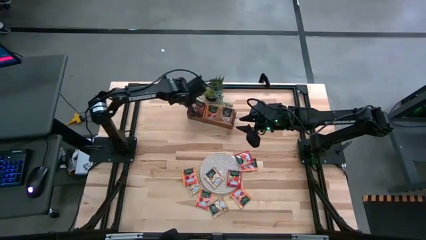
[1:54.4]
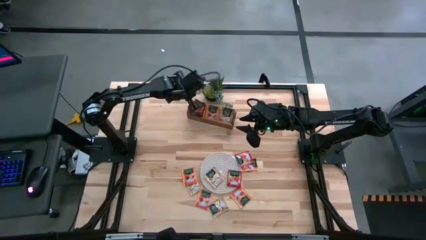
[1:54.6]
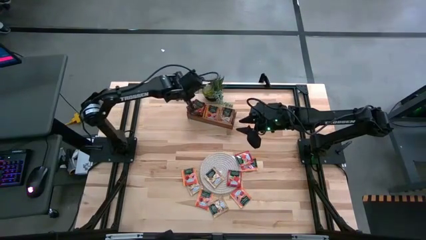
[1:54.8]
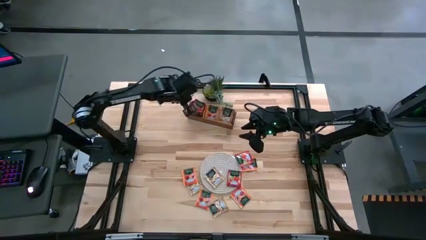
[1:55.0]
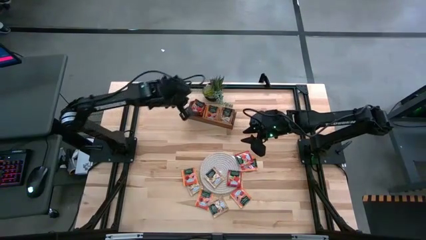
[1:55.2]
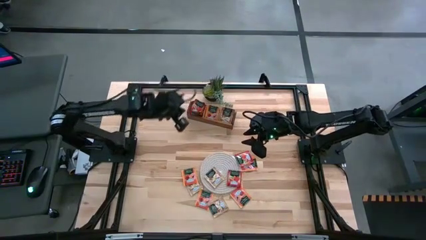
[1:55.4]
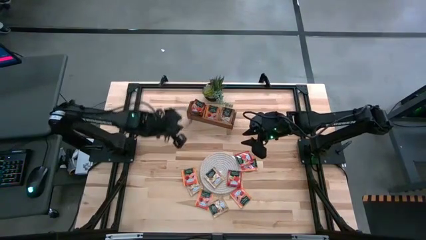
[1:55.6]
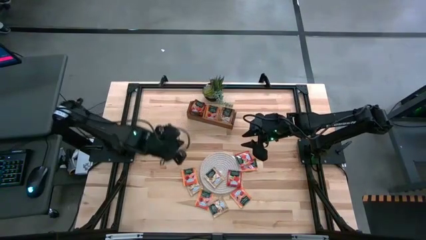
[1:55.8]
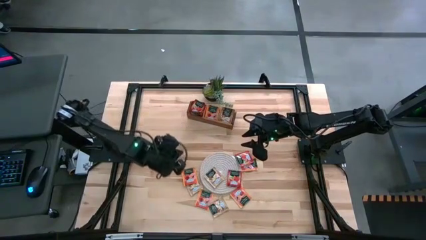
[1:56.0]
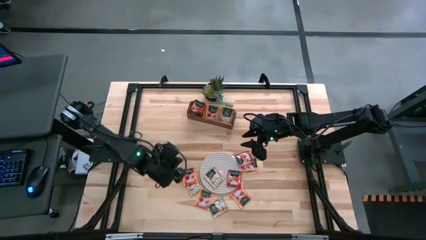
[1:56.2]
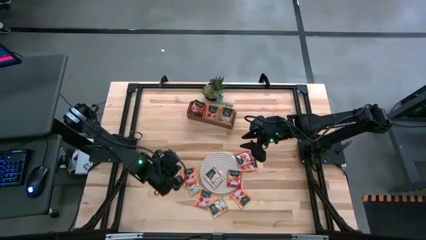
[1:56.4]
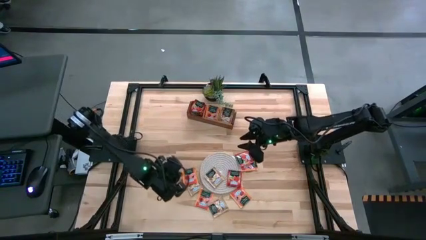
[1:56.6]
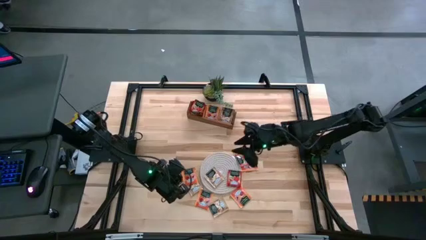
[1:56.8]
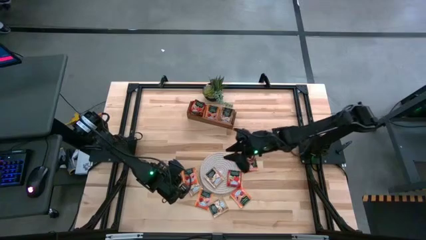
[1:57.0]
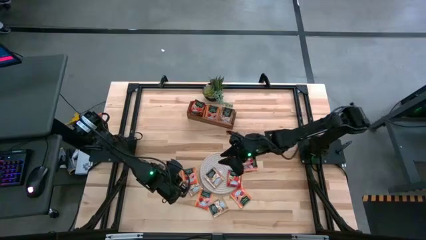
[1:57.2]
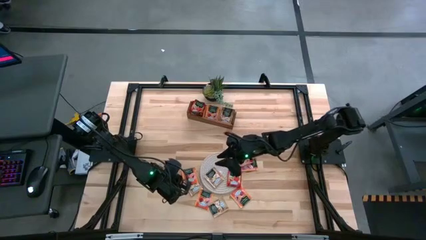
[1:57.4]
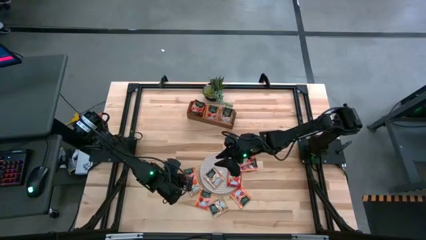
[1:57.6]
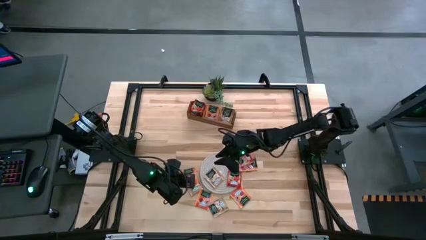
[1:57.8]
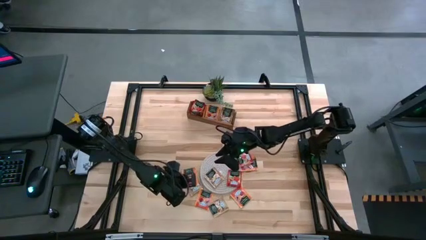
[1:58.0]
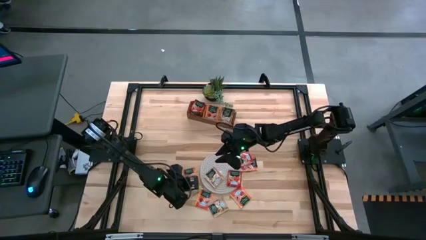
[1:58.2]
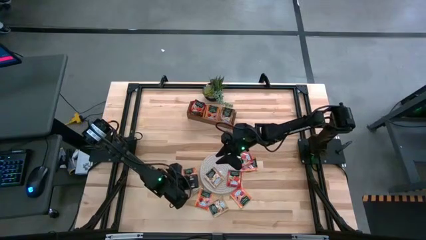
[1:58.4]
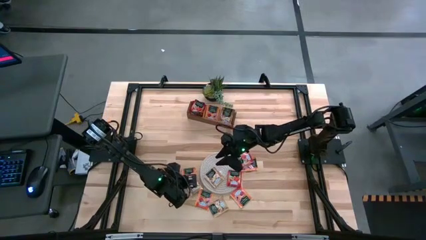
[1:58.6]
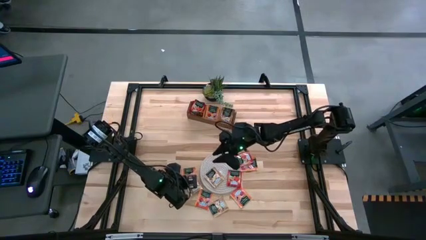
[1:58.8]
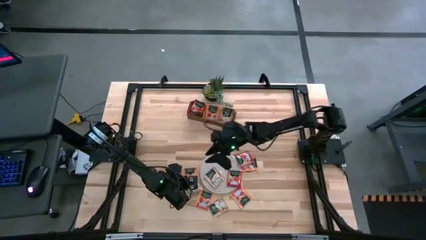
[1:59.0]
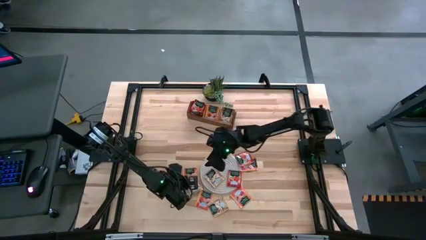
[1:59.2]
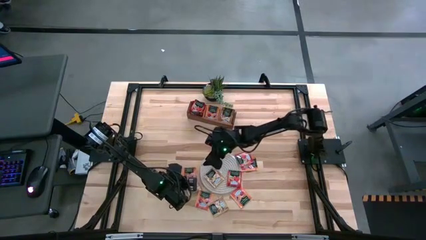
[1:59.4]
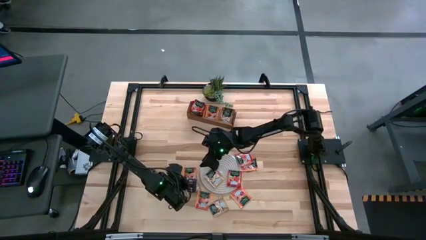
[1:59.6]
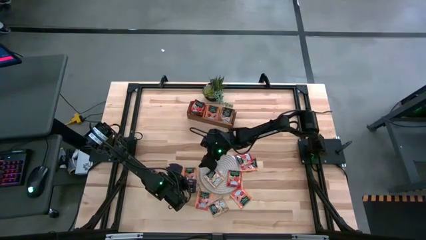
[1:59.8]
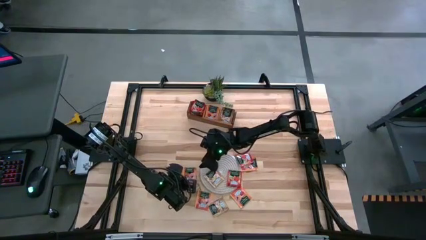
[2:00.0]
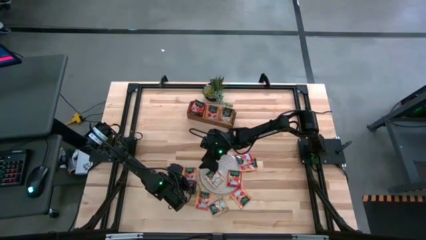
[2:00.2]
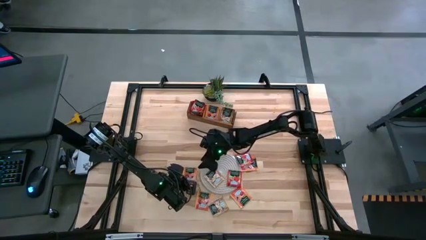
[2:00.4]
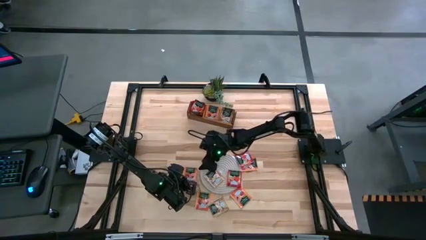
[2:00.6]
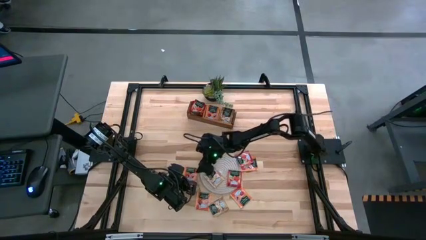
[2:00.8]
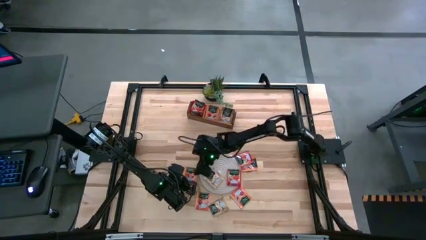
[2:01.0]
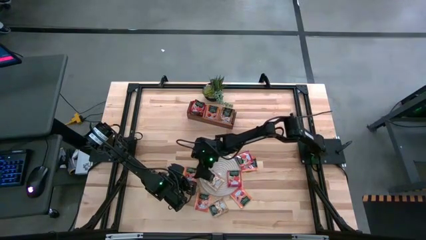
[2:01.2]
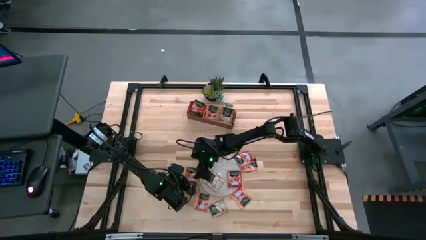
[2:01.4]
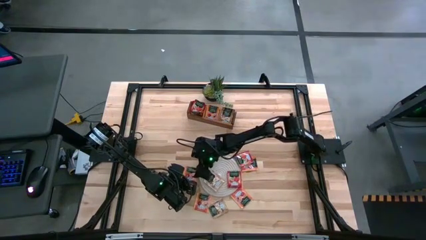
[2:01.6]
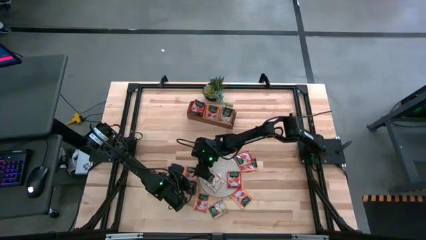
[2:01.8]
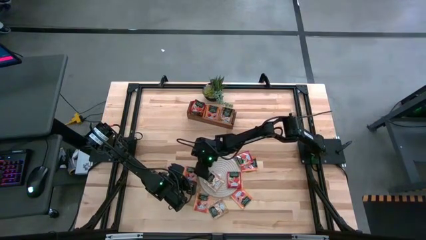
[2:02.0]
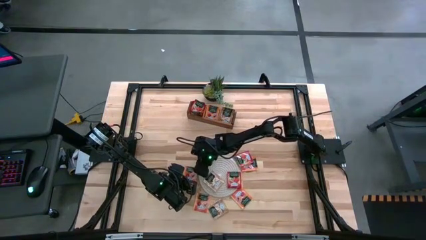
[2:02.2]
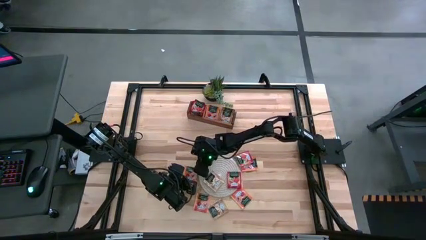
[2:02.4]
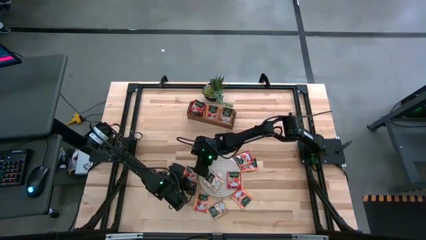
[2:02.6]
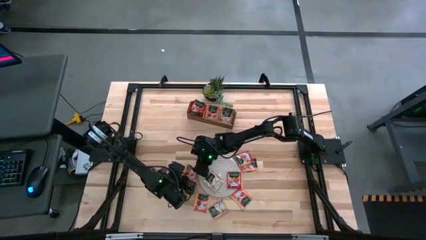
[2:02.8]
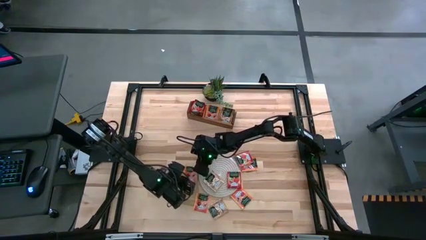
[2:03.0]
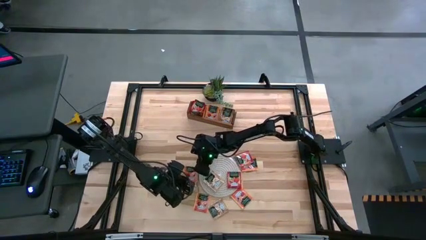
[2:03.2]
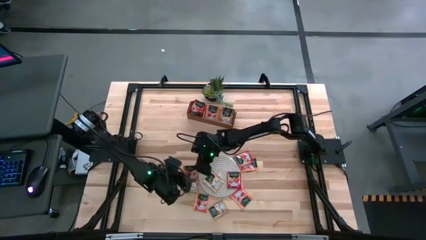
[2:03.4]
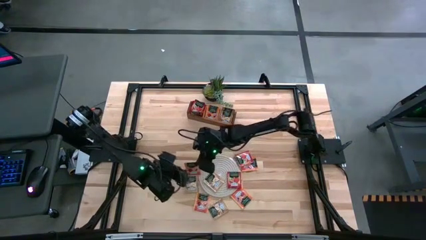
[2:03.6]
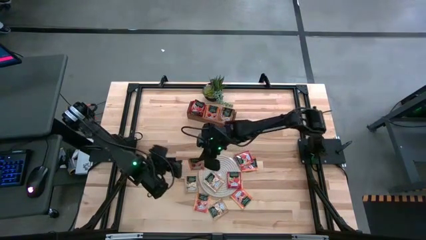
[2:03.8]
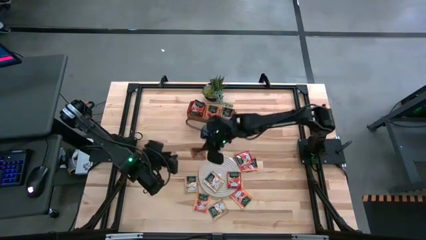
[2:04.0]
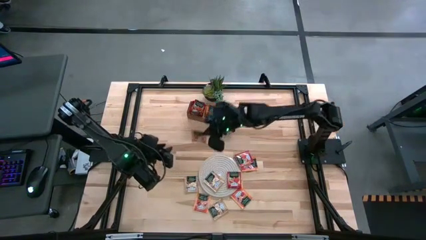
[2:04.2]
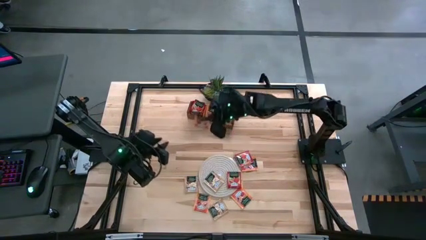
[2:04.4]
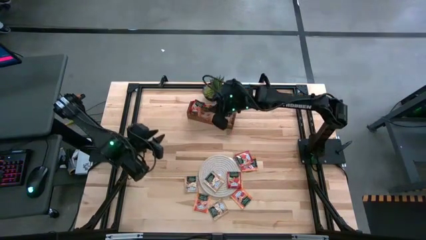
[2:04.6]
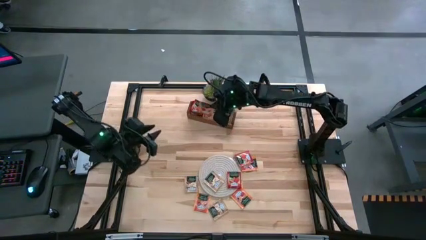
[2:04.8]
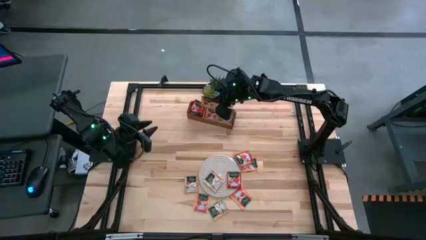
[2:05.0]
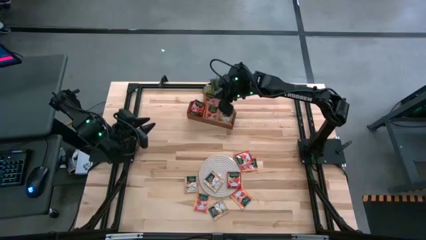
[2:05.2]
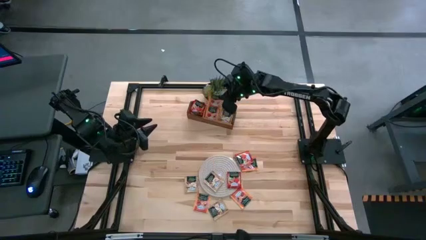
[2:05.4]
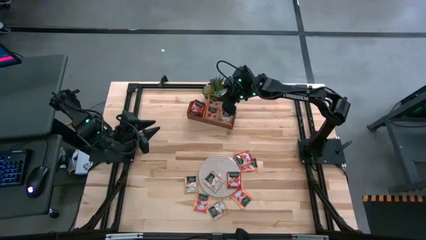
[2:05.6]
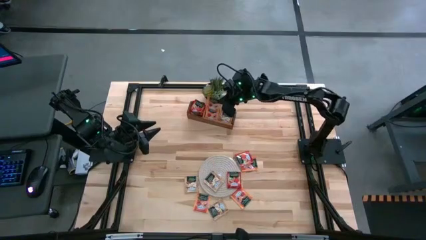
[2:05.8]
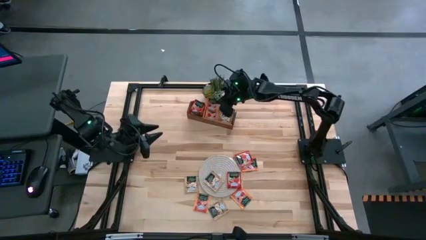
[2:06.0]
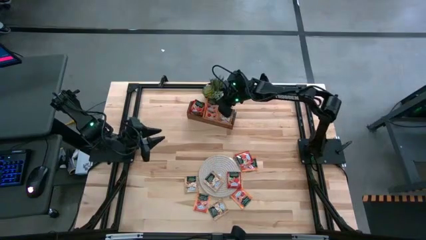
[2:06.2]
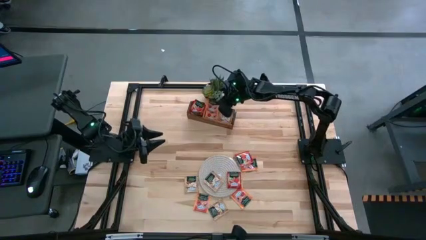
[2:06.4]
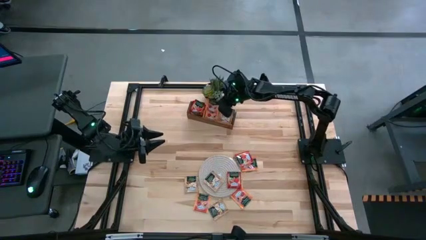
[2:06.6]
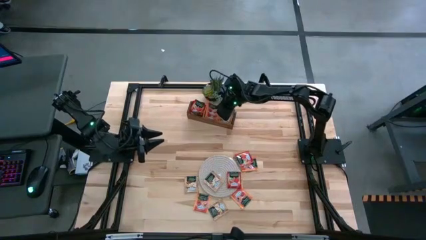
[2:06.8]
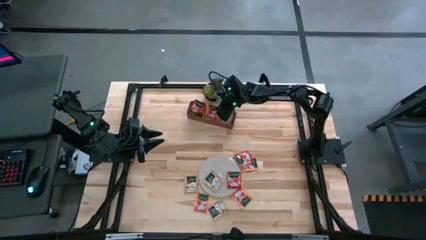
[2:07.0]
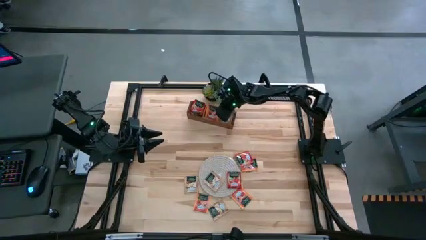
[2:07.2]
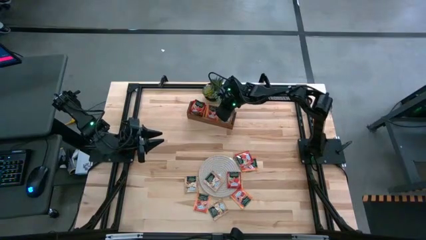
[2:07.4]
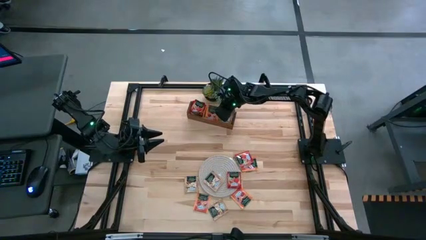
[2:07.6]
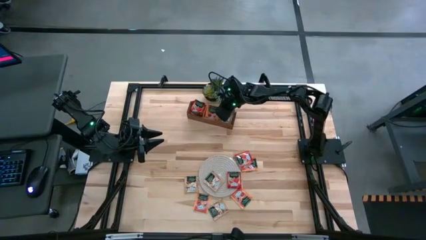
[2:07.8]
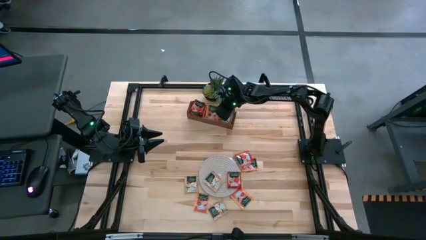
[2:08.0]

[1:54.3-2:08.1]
Task: Pick & Place Tea
Put the orange tea bag into the middle section of the wooden organizer
